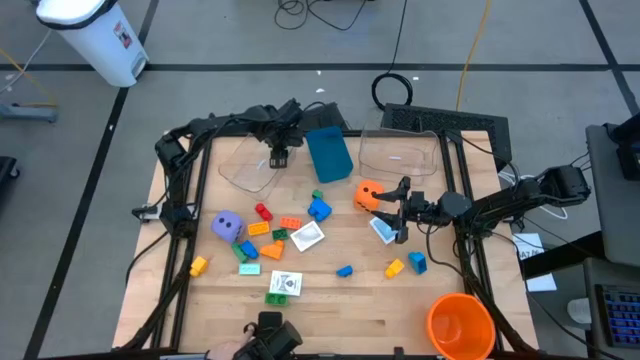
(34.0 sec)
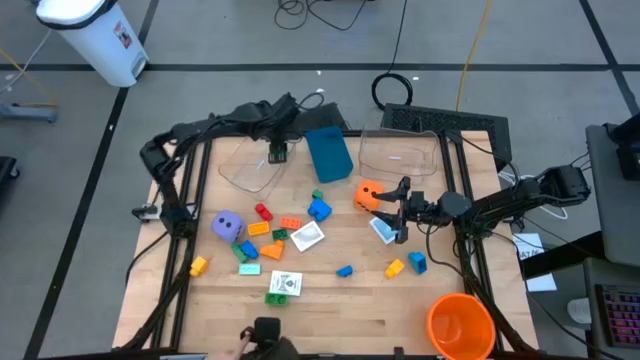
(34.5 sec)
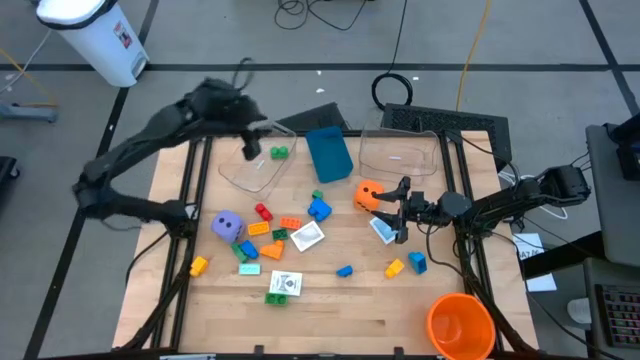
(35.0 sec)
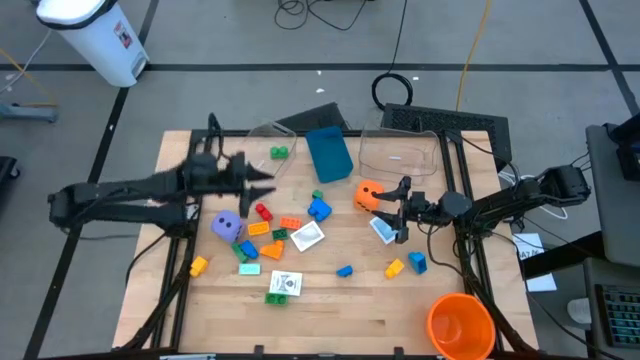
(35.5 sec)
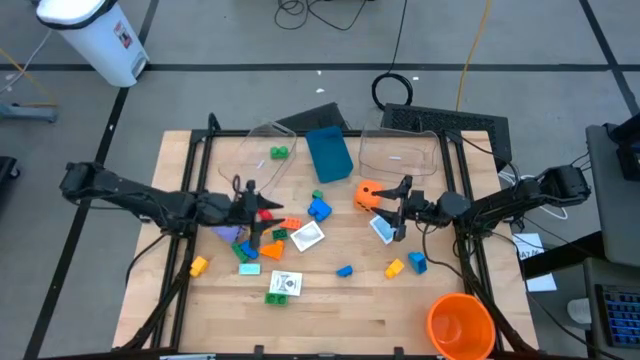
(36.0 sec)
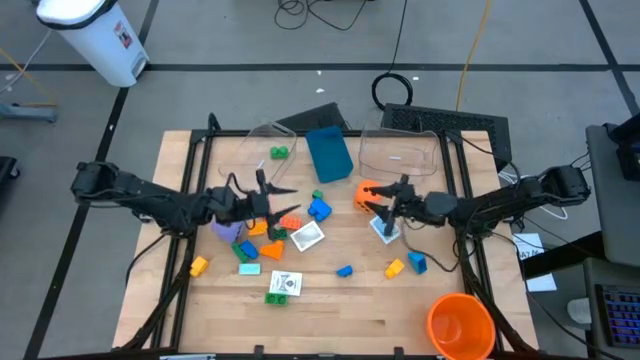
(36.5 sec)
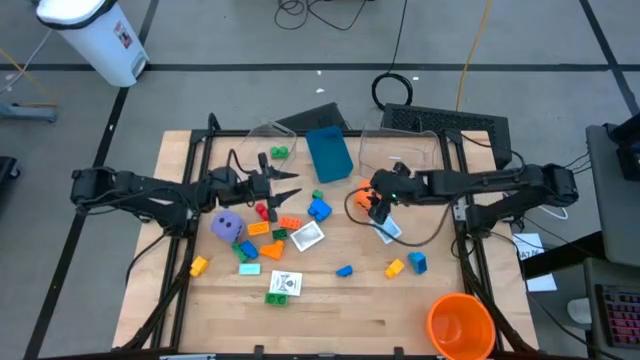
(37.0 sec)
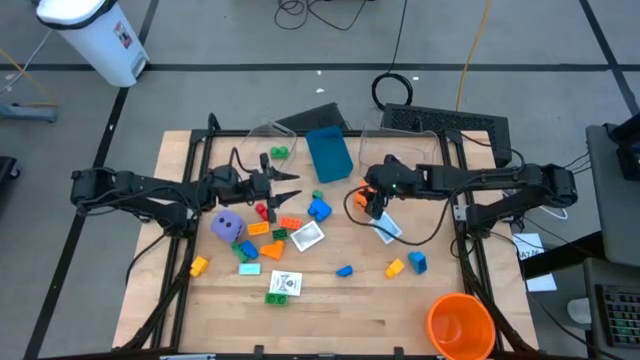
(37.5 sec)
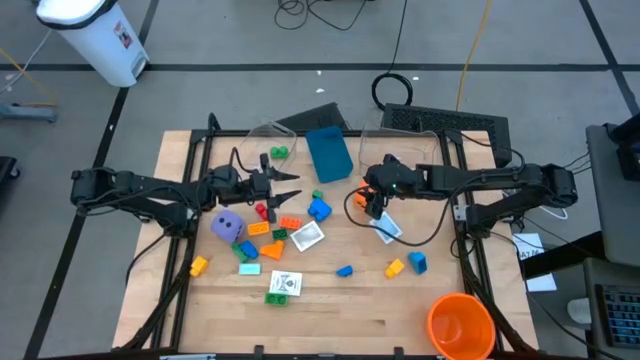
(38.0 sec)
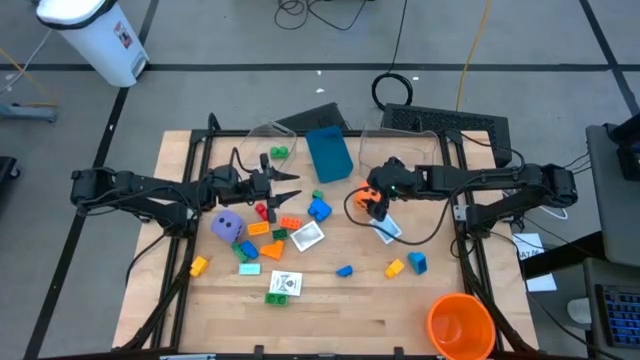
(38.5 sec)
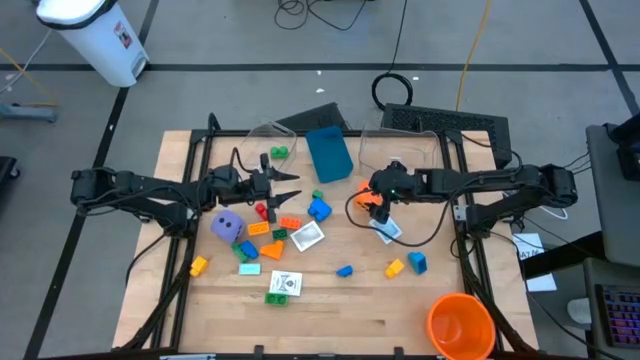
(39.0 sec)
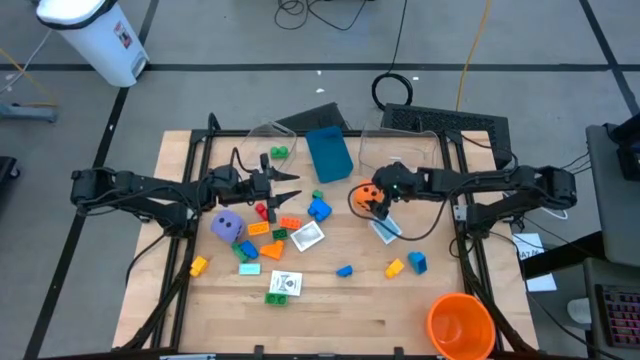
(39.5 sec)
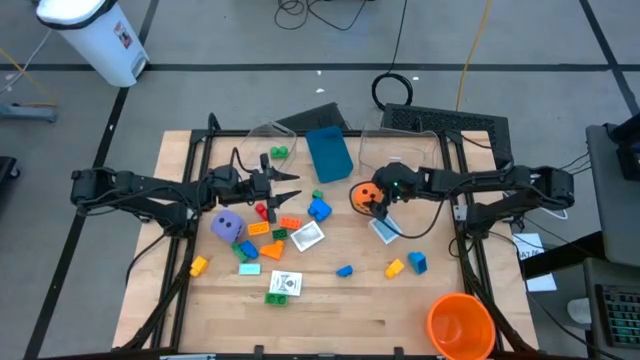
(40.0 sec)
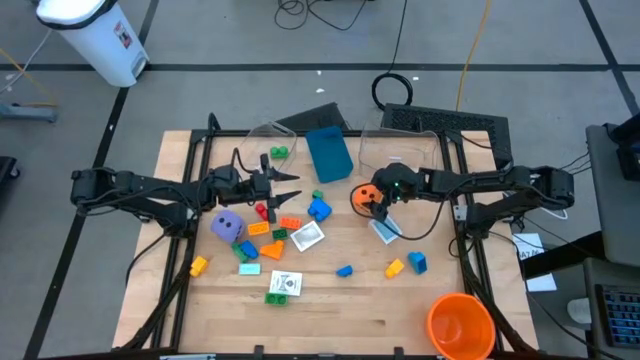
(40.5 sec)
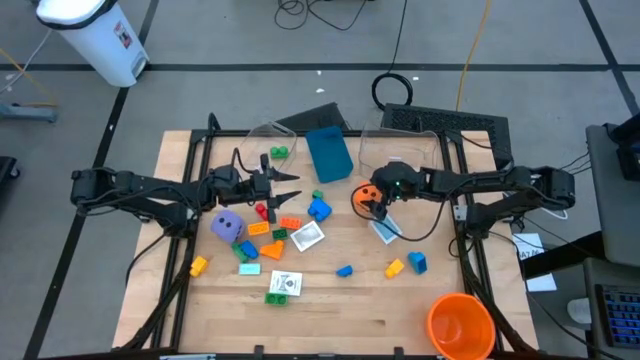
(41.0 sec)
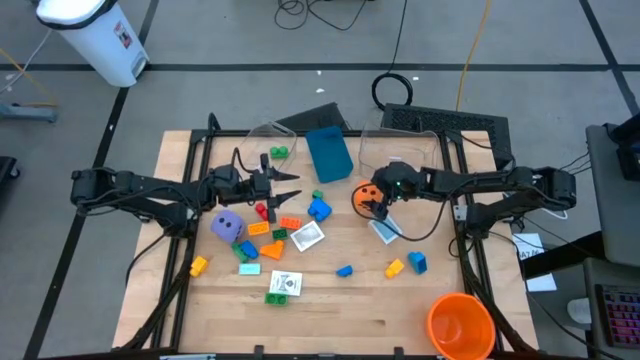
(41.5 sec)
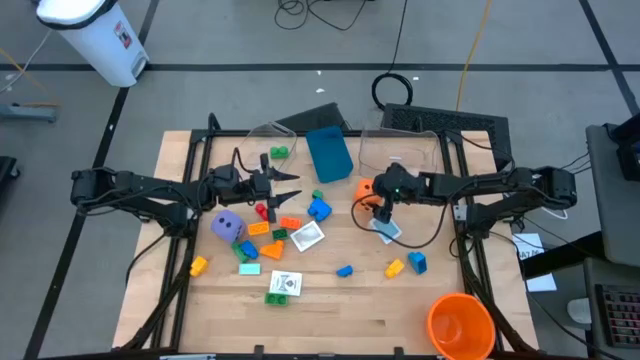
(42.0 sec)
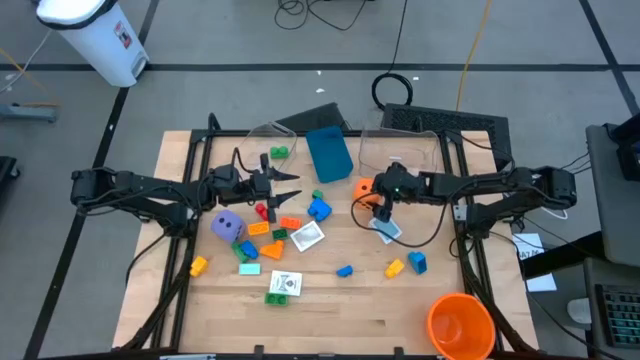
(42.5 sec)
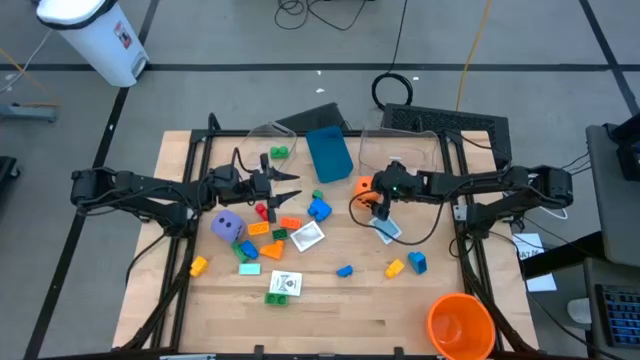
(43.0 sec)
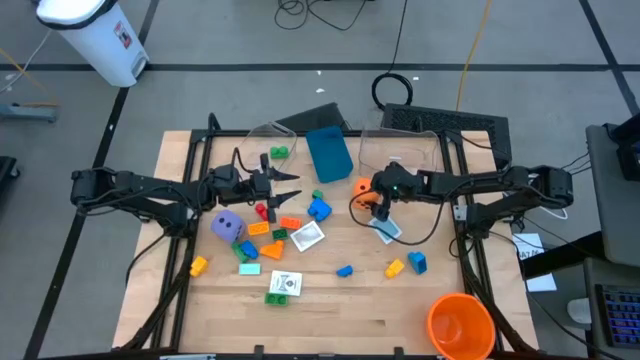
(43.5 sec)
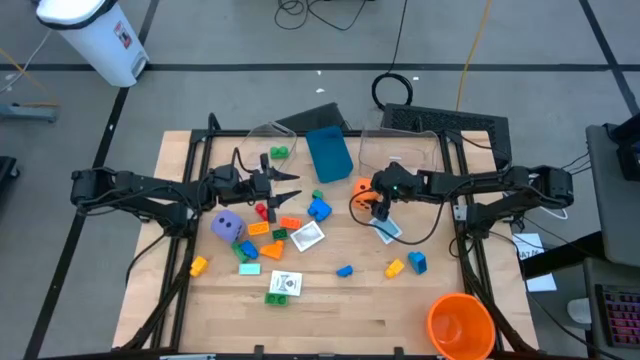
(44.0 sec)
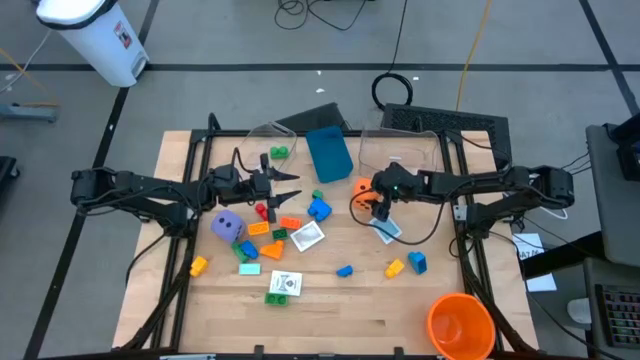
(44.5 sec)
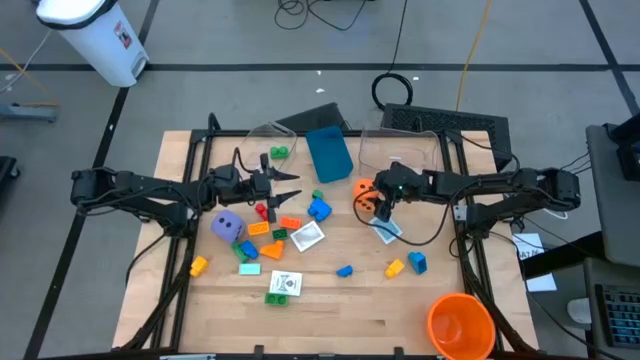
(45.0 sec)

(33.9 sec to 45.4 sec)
Task: Pick & Place Toys
Put the orange dice into the blue bin

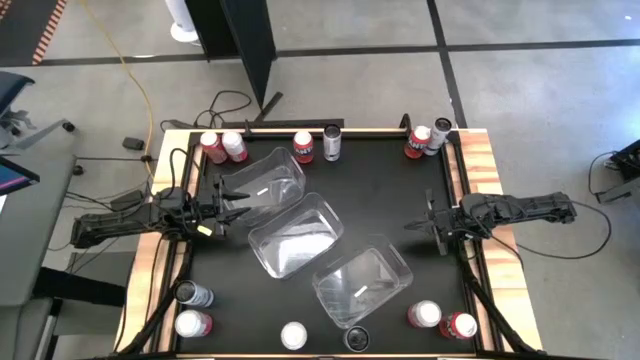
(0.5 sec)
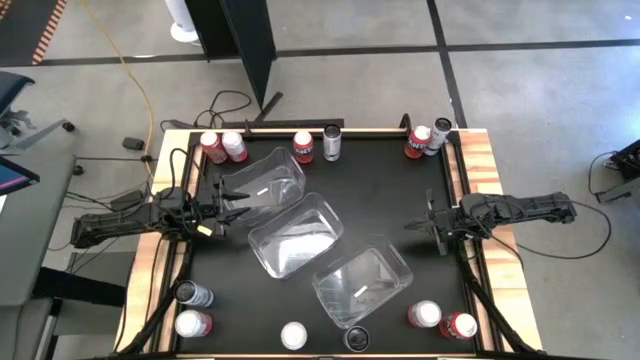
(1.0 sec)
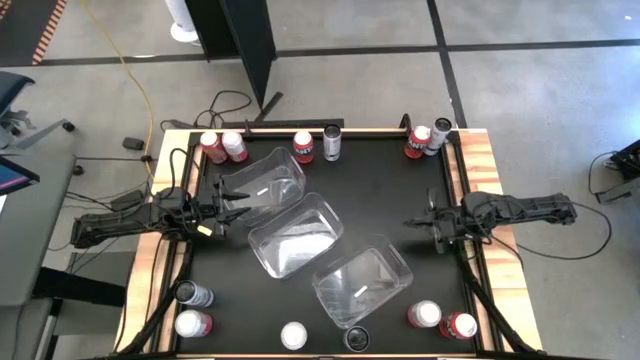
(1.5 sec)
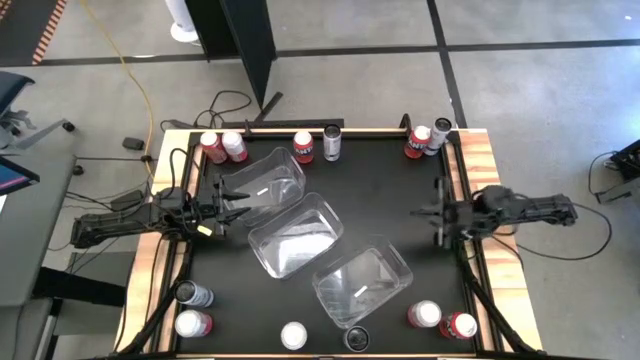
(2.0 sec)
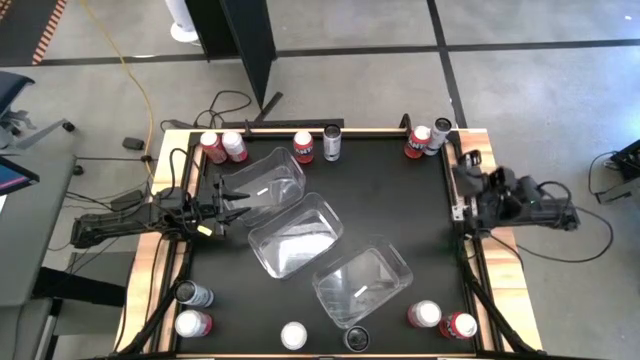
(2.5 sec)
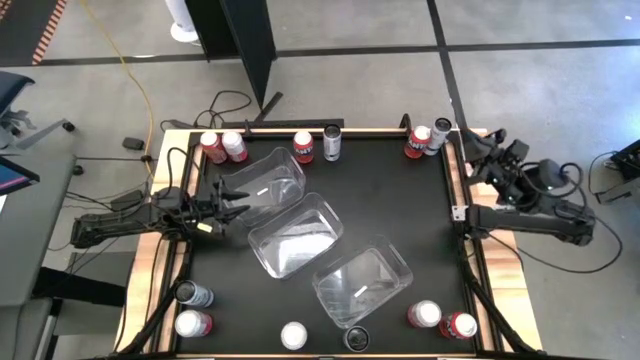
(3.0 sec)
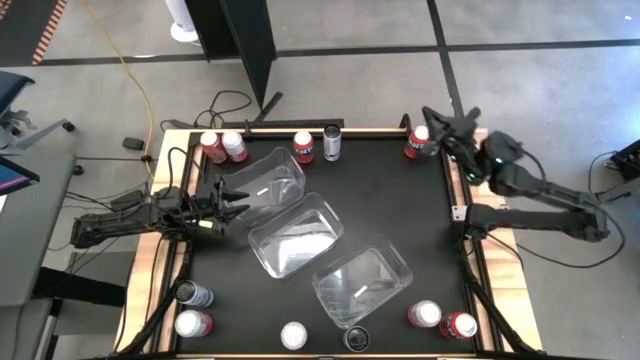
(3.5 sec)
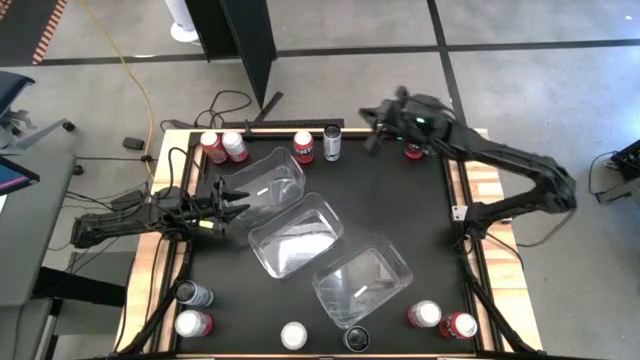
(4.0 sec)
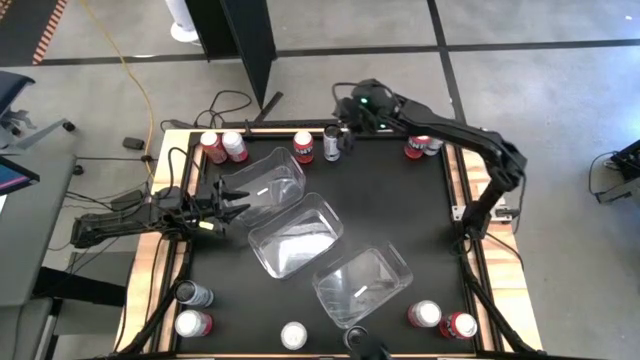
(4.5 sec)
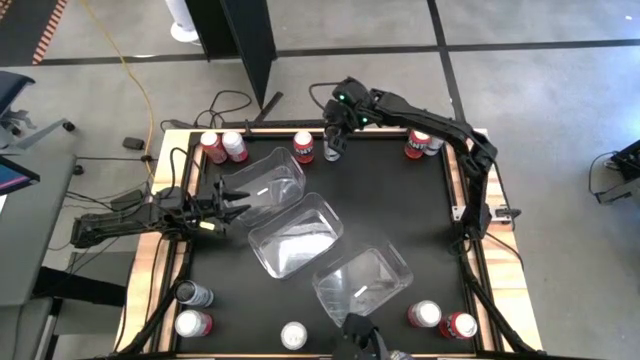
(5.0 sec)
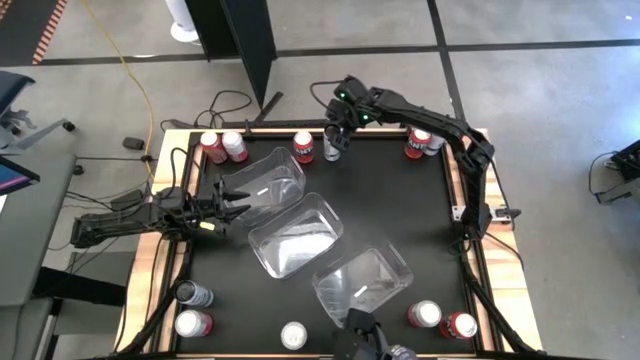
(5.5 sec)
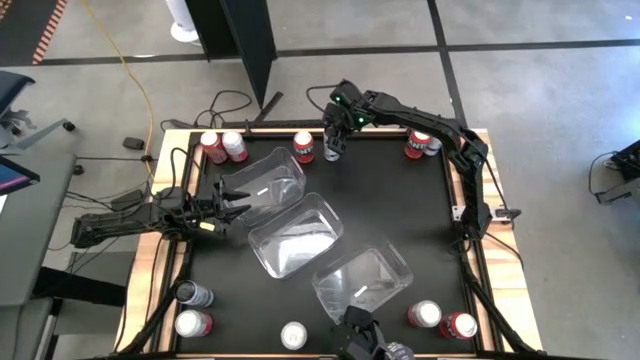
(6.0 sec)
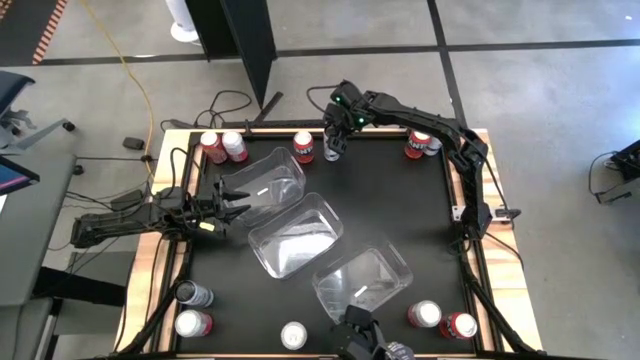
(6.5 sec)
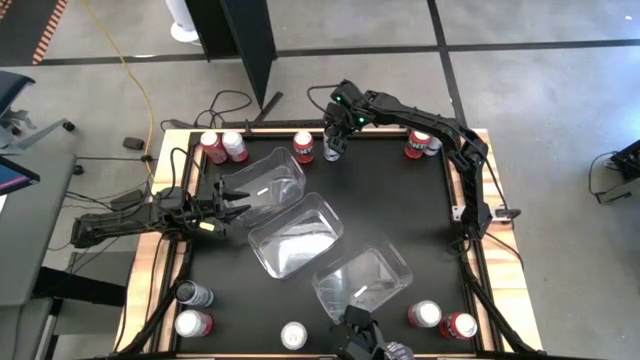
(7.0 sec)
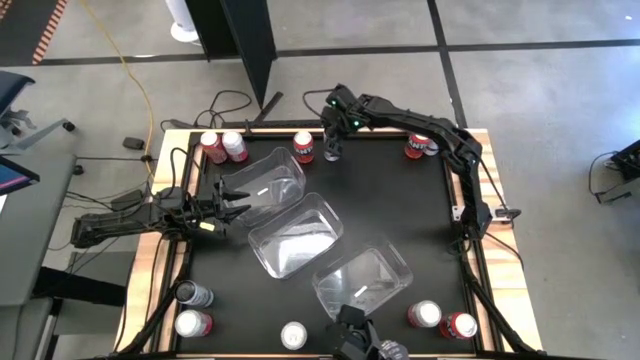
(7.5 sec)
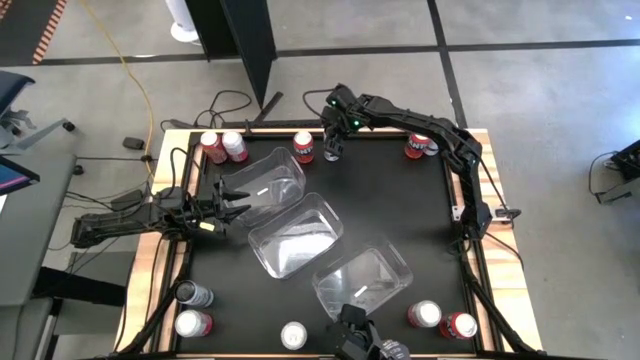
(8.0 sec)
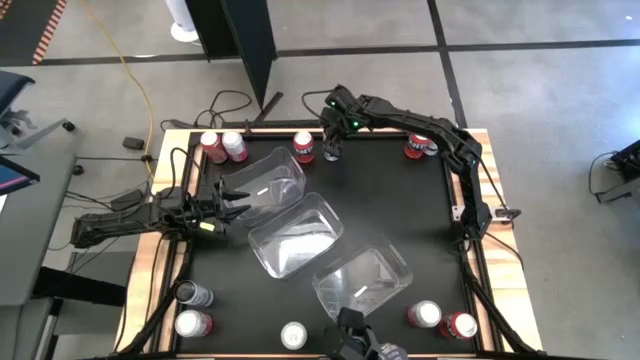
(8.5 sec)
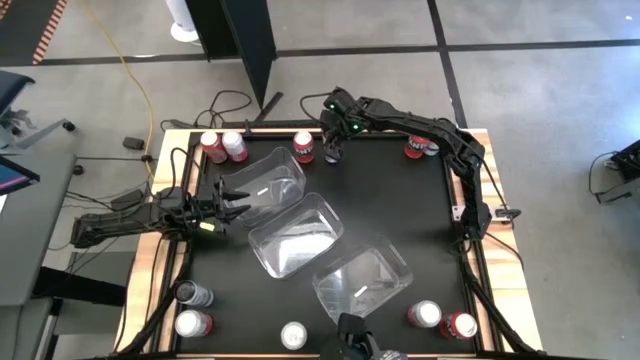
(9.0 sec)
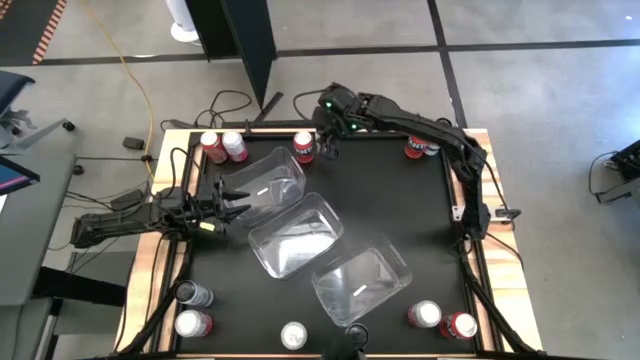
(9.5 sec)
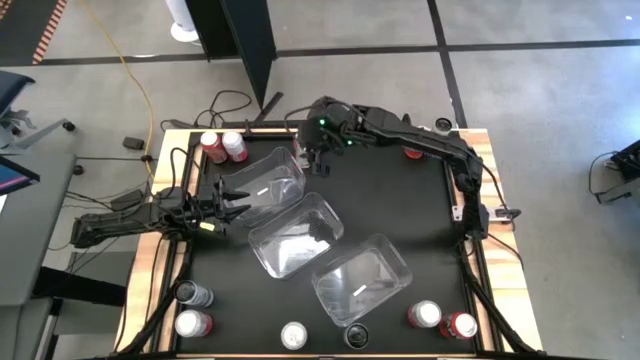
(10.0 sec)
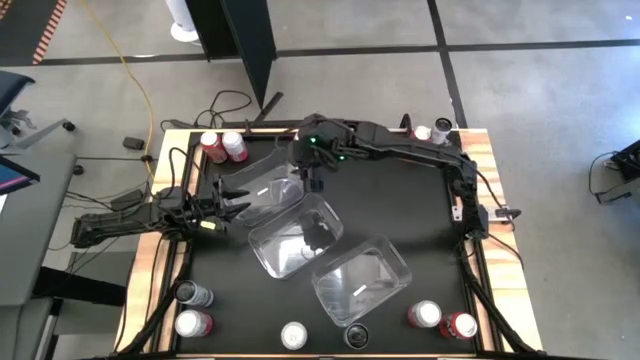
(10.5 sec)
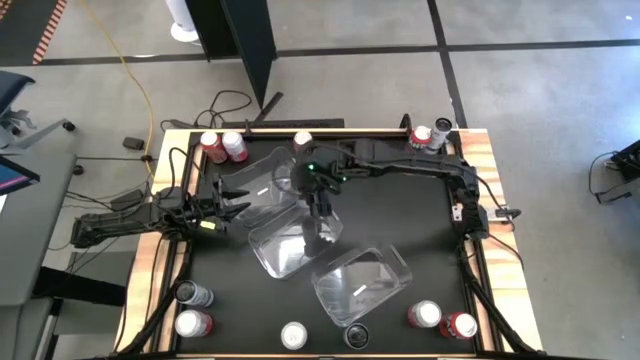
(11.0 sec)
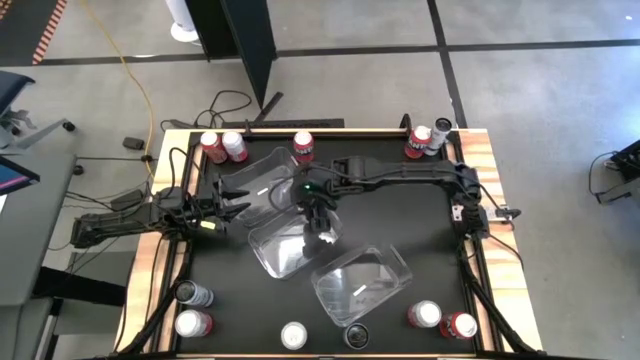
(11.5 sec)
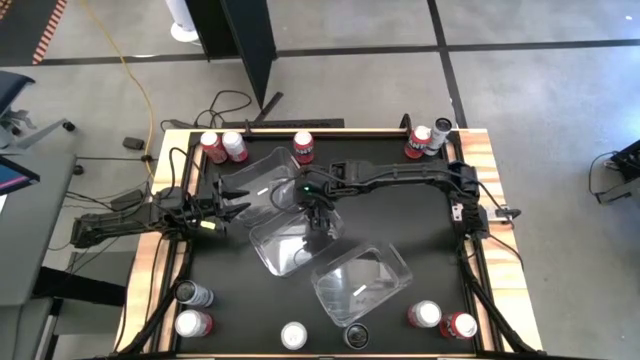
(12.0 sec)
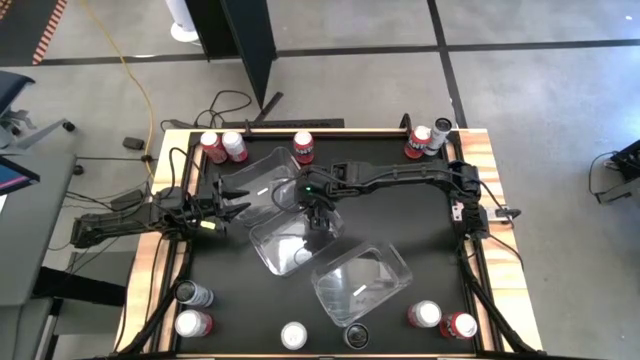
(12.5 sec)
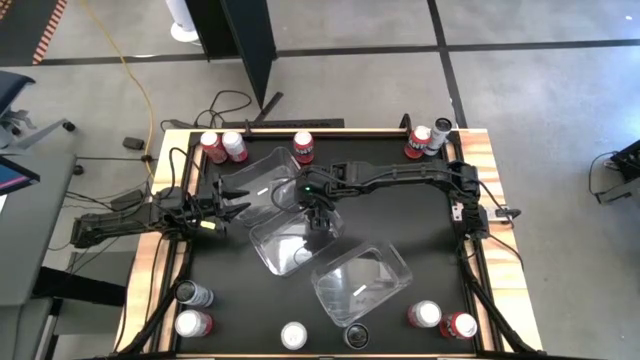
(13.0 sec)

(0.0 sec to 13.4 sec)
Task: Sort soda cans
Put the top middle white soda can in the center transparent bin
